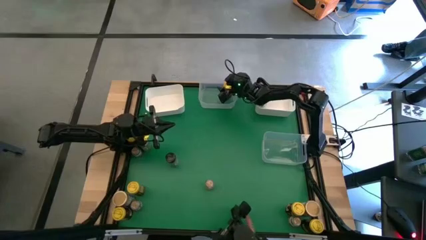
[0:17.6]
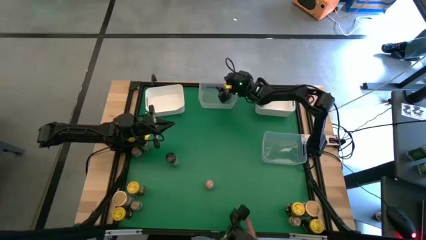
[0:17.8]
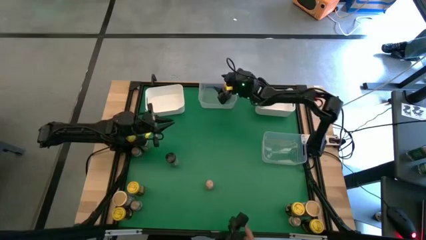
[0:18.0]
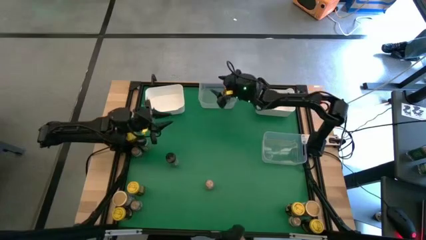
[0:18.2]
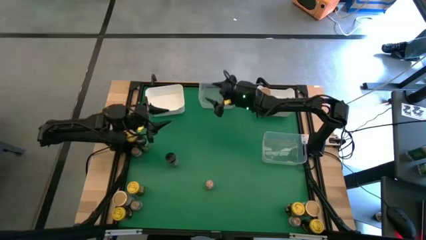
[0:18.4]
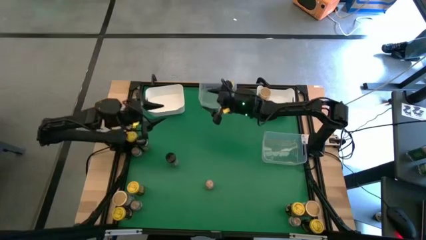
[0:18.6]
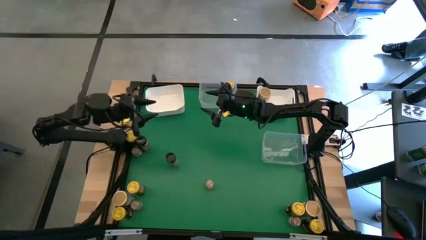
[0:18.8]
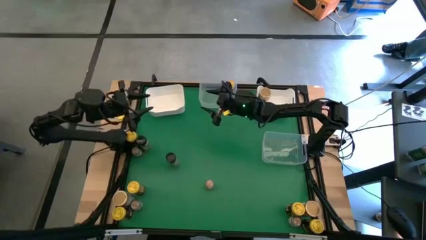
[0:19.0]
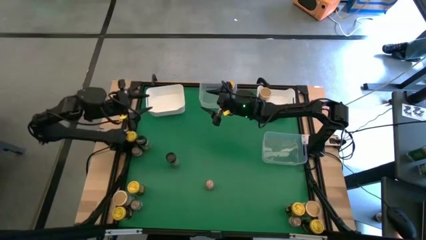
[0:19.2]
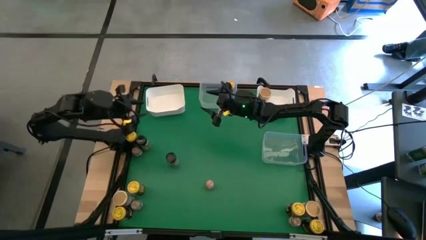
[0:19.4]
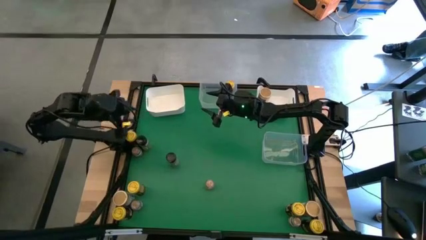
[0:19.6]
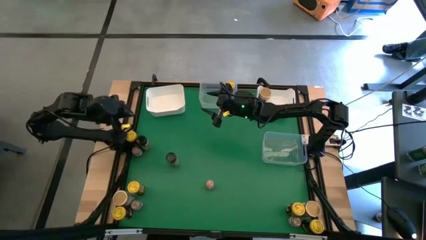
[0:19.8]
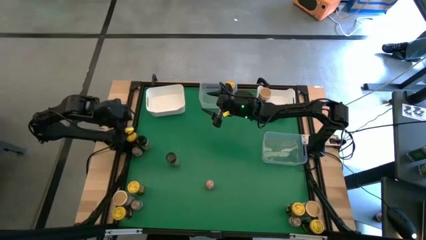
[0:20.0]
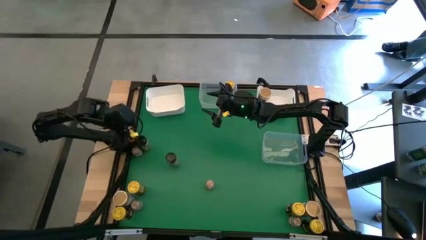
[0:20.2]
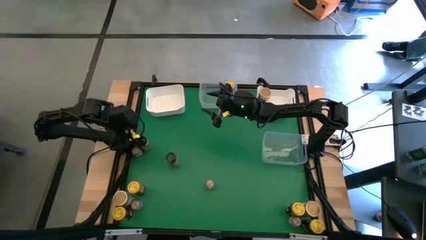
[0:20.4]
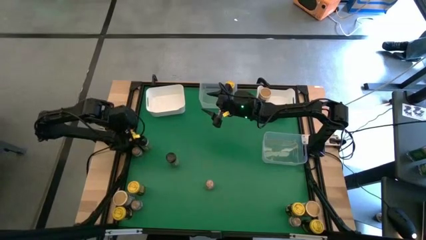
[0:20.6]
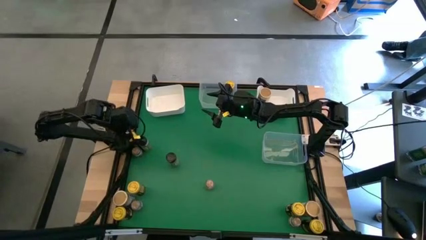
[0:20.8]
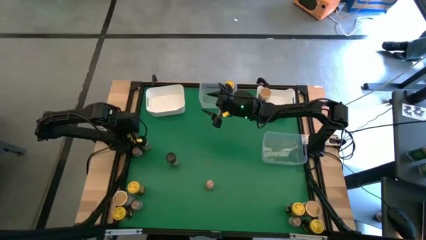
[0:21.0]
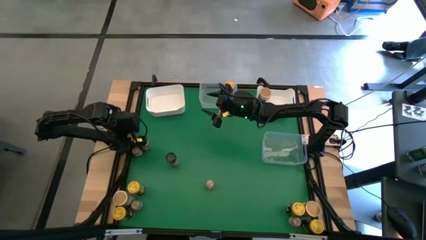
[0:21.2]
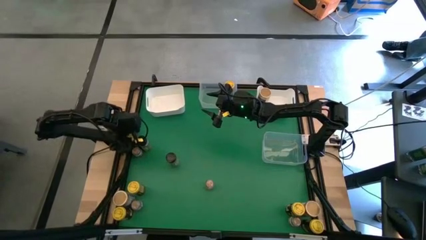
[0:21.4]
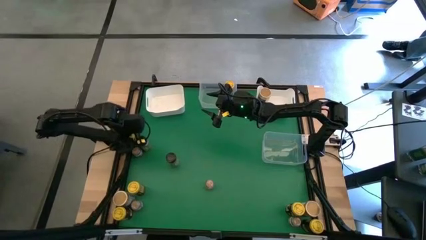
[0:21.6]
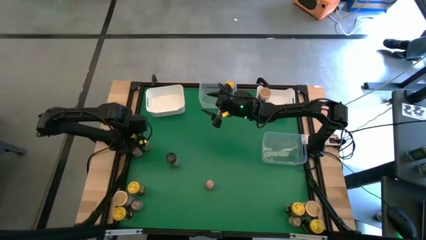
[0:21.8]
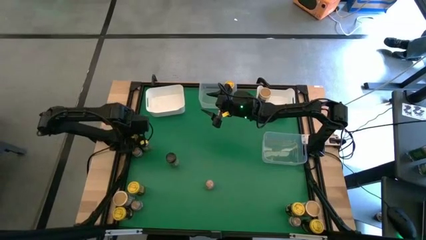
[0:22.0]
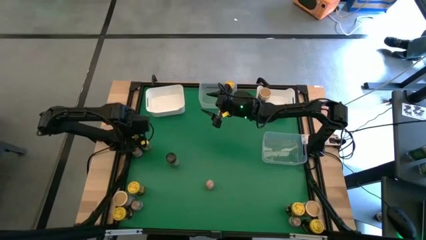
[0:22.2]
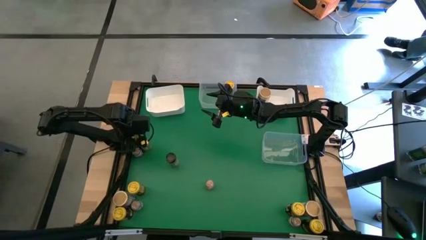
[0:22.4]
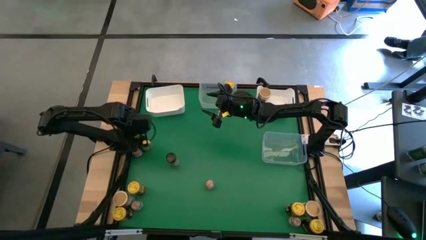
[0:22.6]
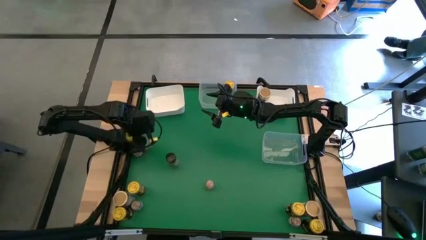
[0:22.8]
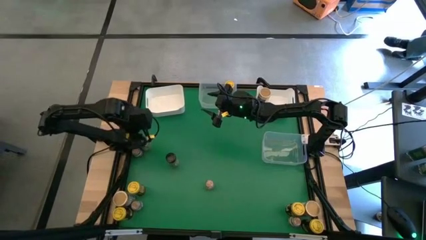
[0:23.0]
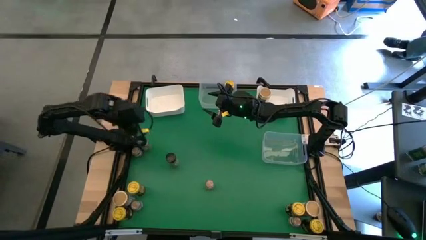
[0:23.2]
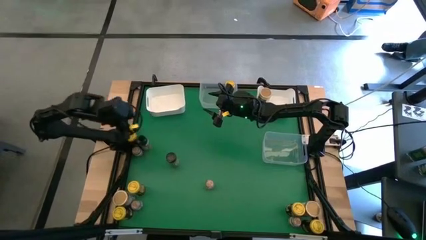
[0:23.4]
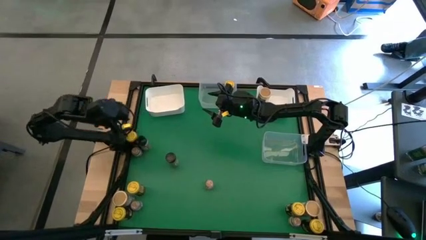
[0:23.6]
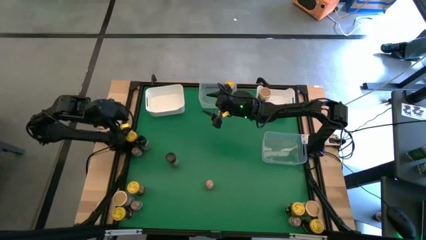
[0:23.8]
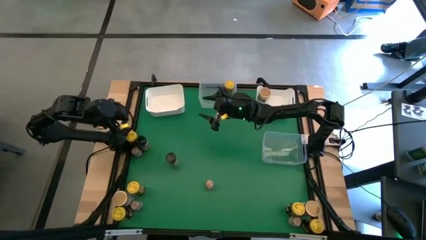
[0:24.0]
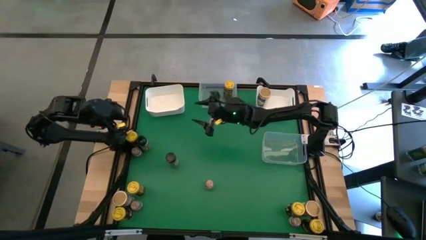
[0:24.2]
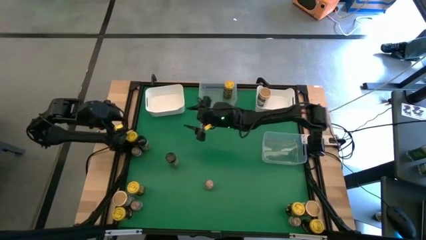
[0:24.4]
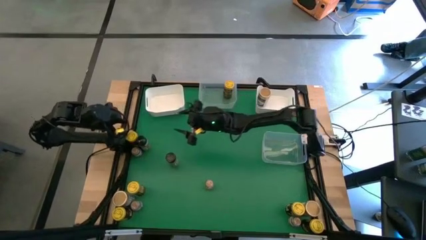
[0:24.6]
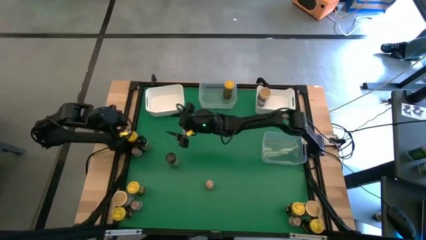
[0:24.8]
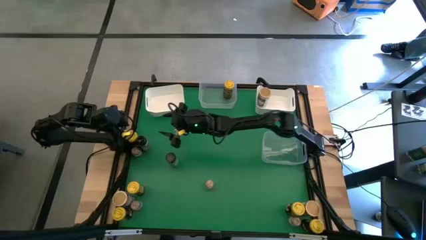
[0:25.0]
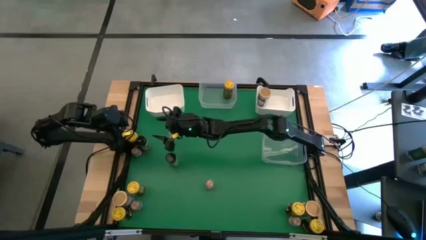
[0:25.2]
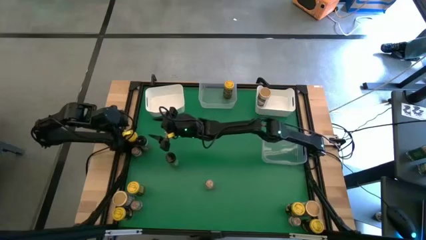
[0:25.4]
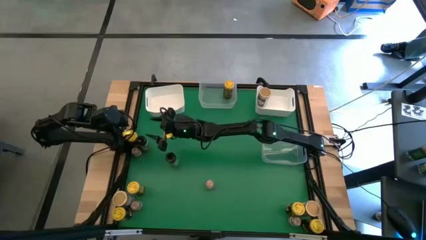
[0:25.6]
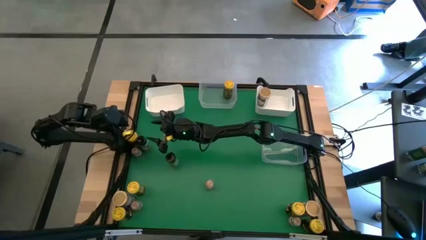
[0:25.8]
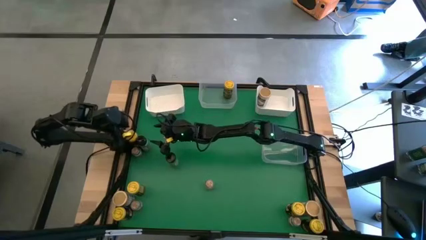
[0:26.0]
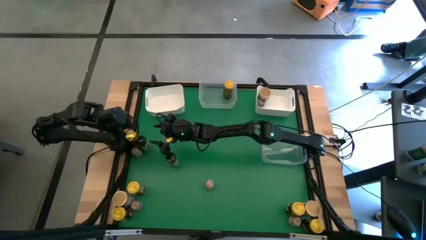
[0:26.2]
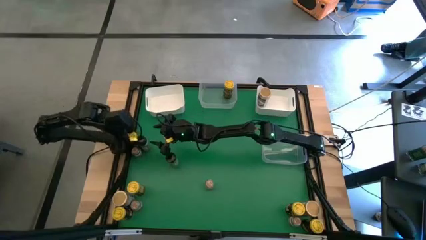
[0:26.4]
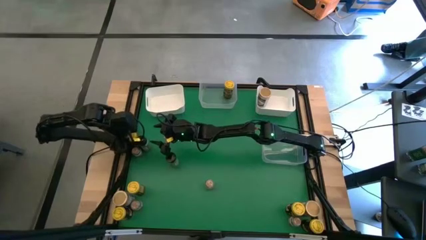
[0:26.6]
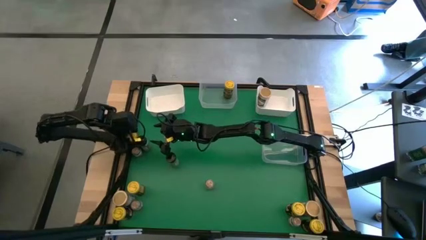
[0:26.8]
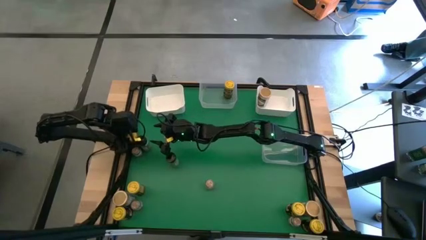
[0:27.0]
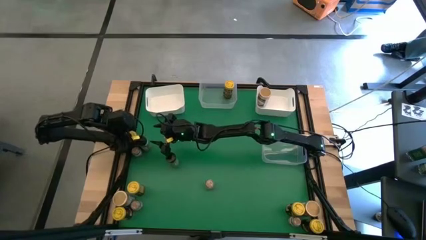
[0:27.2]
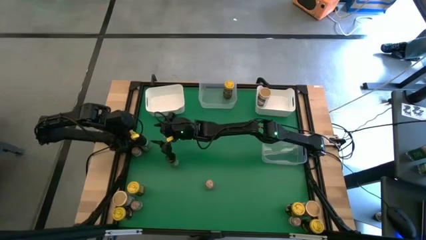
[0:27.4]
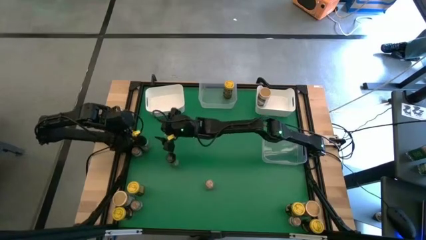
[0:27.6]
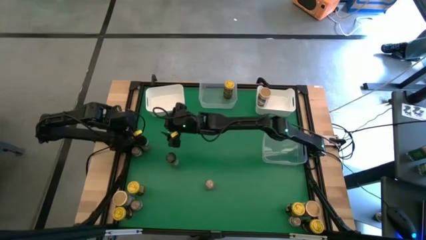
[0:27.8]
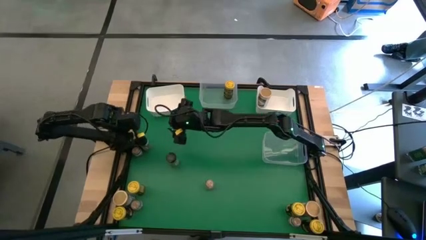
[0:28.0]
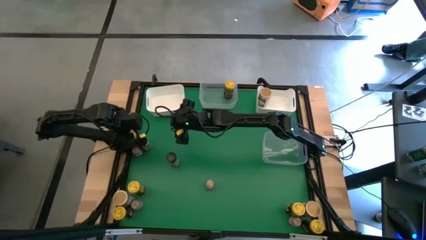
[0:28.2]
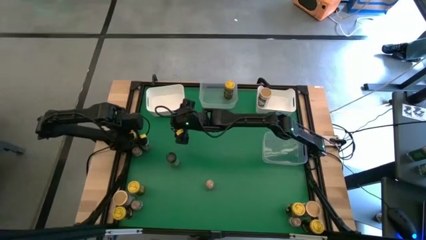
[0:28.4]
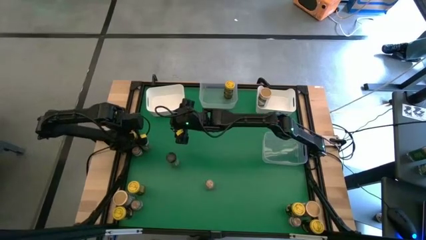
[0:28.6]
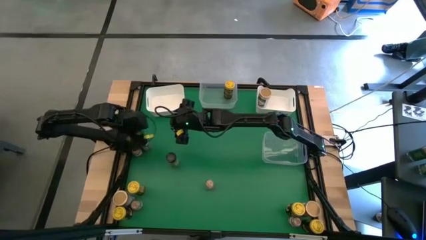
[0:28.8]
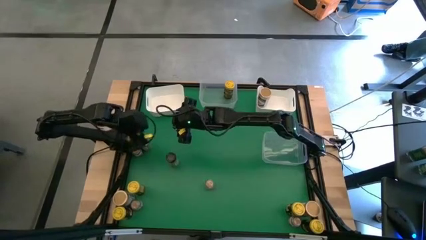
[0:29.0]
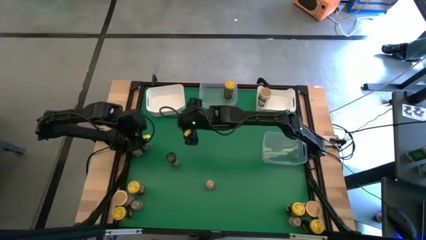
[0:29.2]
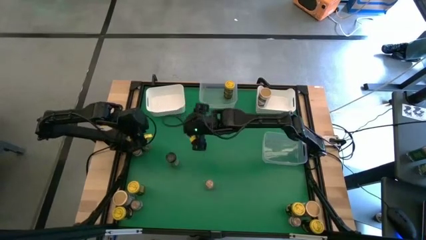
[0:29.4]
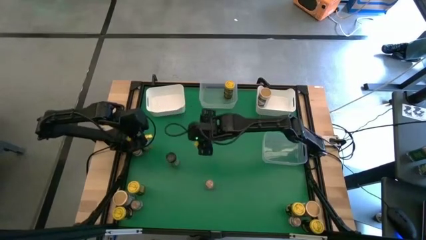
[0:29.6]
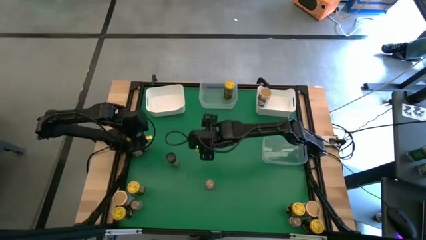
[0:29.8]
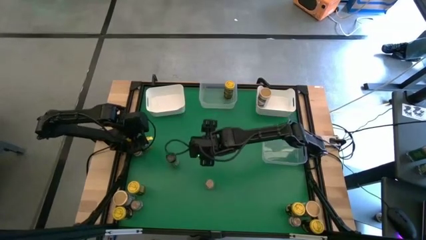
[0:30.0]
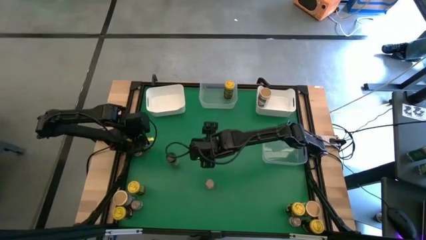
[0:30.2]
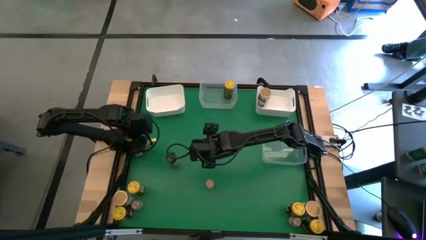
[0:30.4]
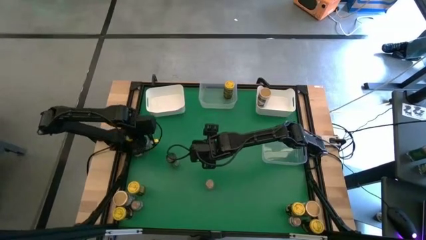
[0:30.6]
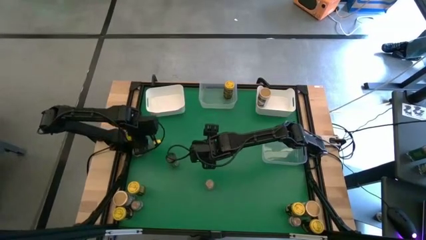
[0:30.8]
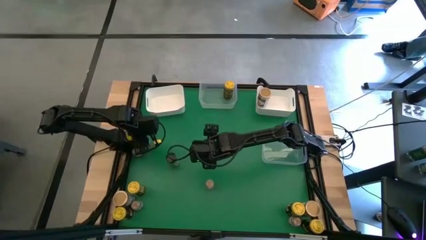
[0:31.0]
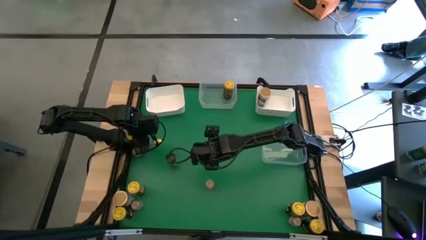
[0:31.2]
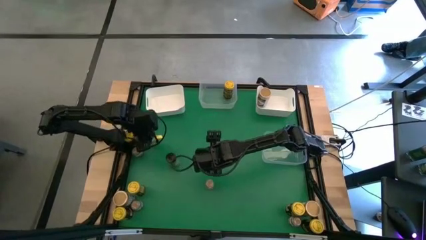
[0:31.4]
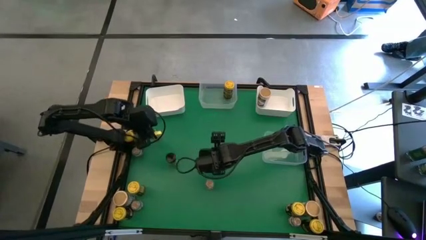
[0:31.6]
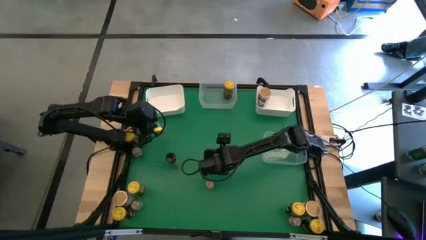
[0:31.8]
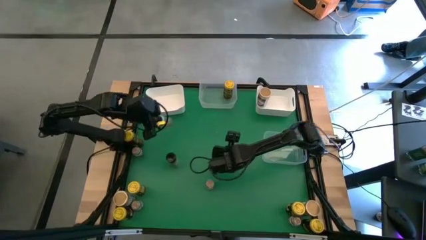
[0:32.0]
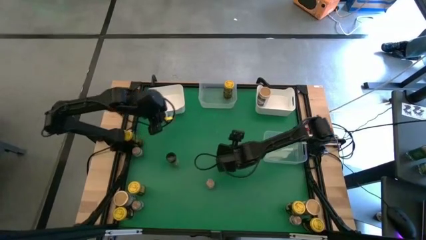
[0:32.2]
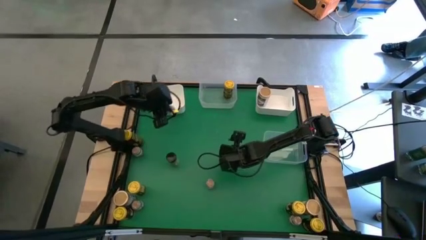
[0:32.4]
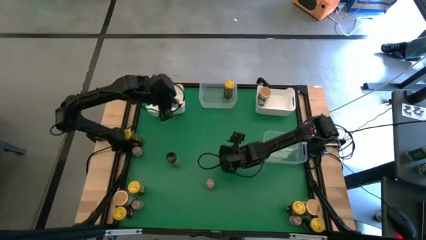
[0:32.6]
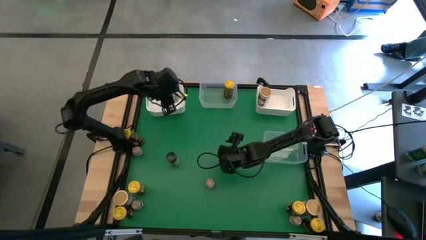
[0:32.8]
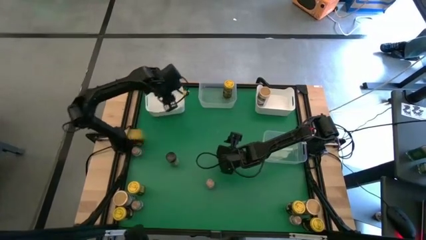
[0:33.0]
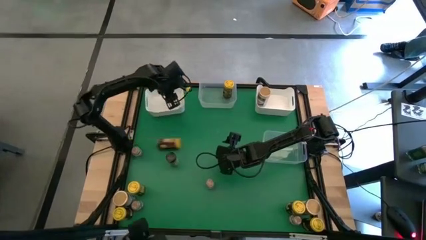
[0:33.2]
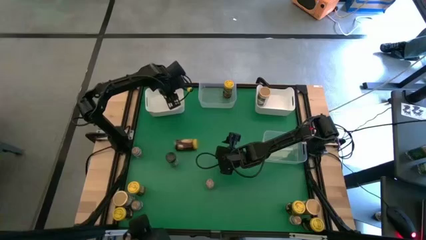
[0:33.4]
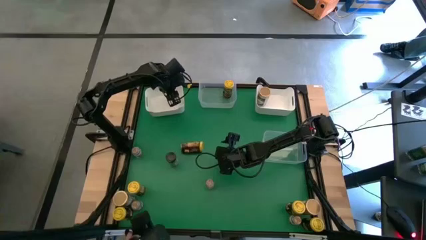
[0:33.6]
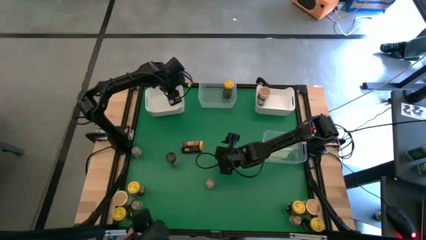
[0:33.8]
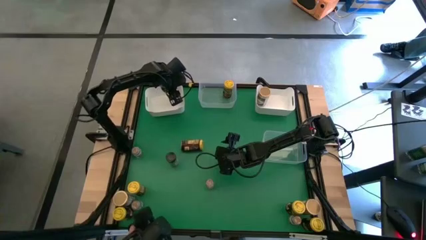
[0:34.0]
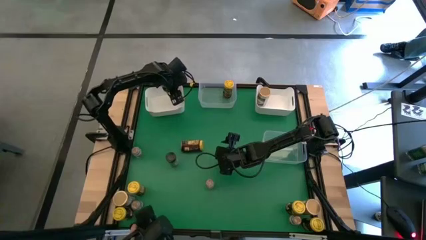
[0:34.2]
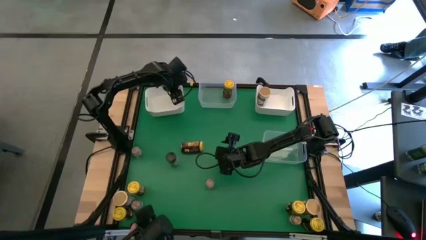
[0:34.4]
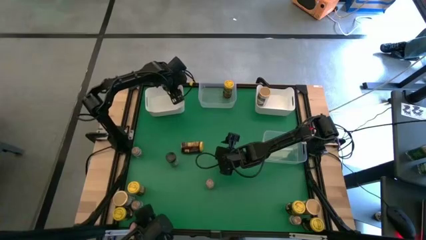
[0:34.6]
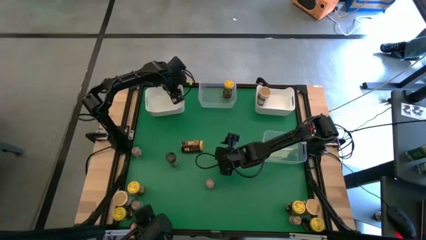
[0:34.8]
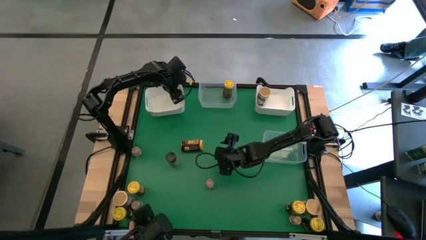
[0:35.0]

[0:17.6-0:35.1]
Task: Sort spices by type
Put the black seasoning bottle into the left white bin
